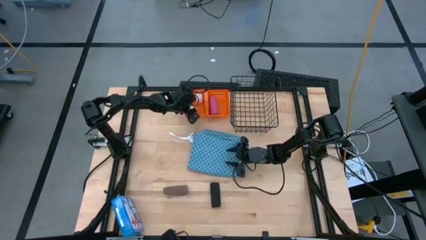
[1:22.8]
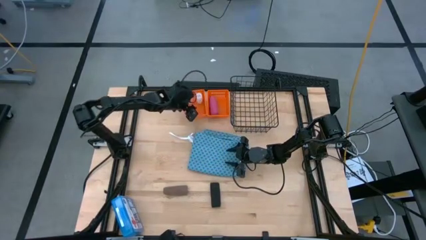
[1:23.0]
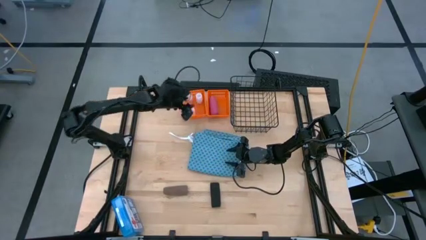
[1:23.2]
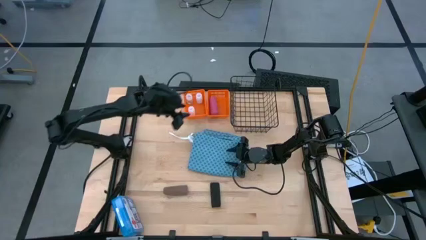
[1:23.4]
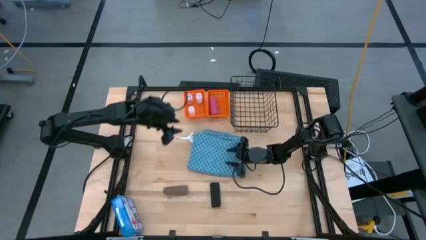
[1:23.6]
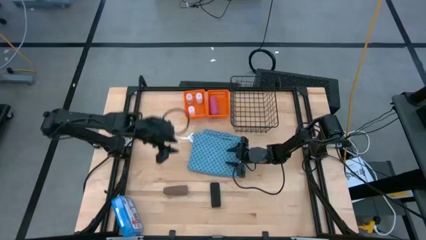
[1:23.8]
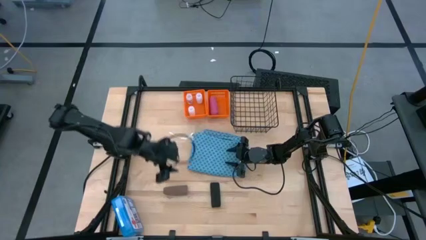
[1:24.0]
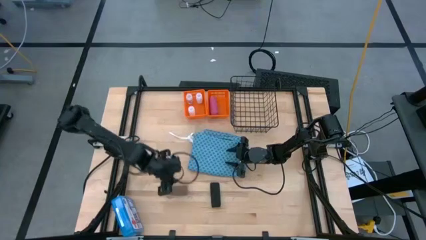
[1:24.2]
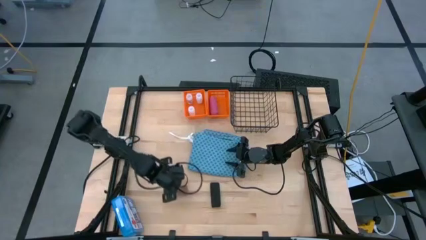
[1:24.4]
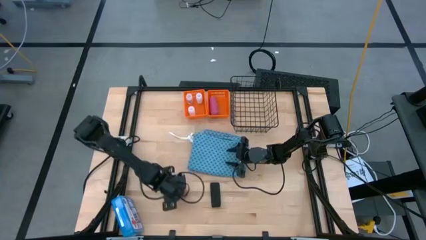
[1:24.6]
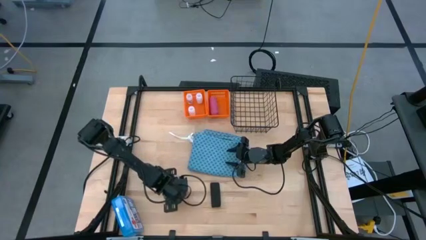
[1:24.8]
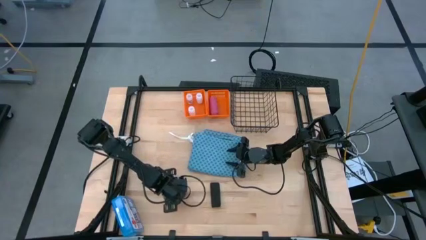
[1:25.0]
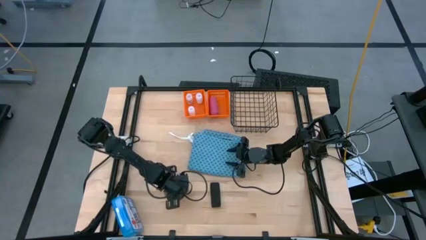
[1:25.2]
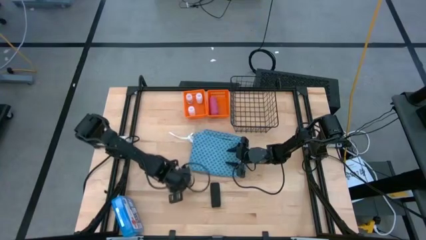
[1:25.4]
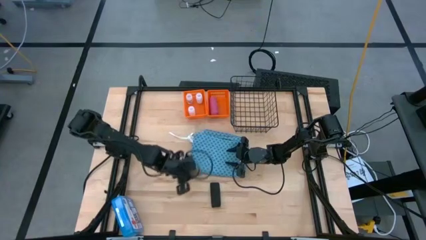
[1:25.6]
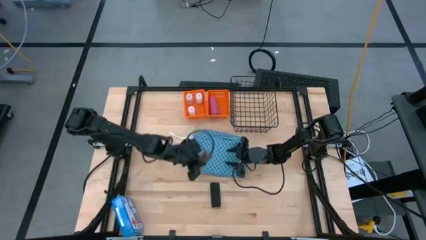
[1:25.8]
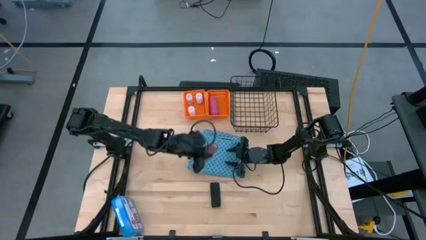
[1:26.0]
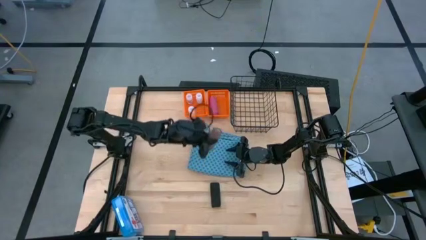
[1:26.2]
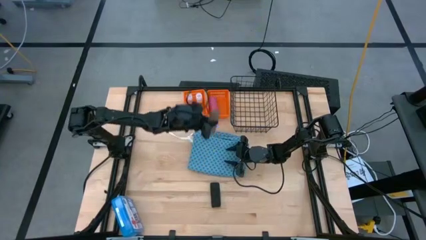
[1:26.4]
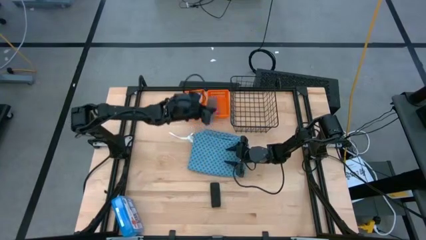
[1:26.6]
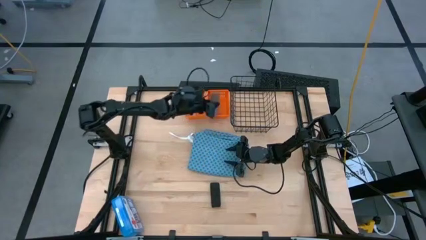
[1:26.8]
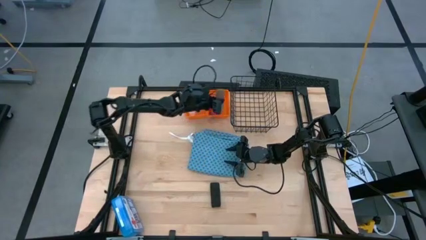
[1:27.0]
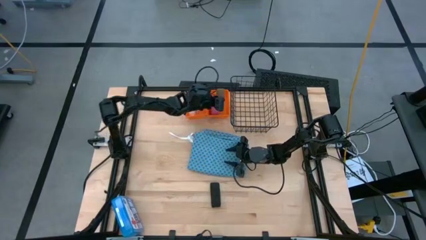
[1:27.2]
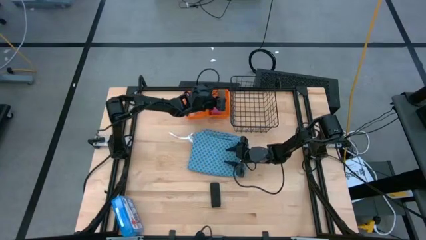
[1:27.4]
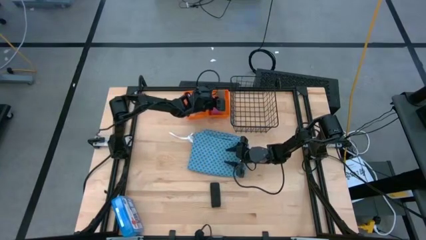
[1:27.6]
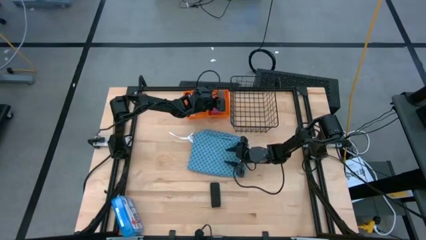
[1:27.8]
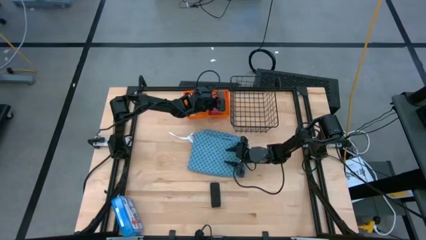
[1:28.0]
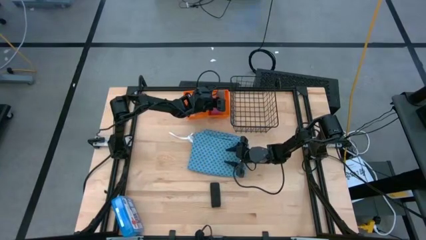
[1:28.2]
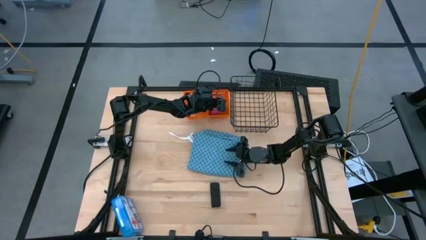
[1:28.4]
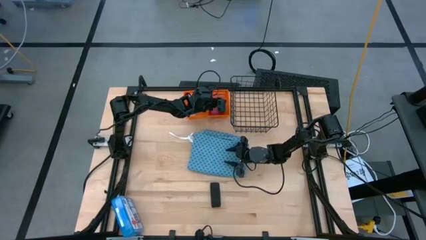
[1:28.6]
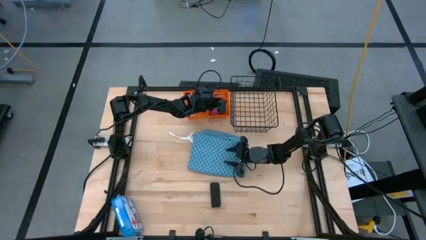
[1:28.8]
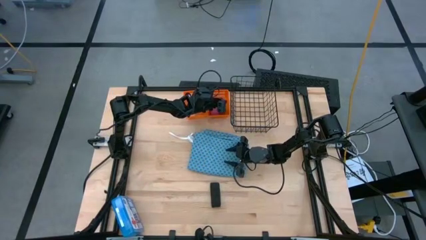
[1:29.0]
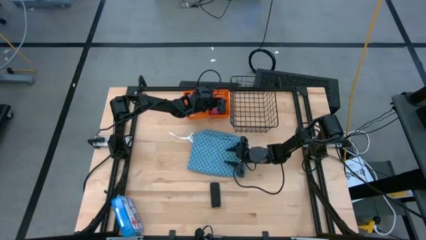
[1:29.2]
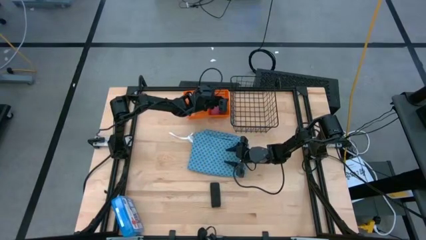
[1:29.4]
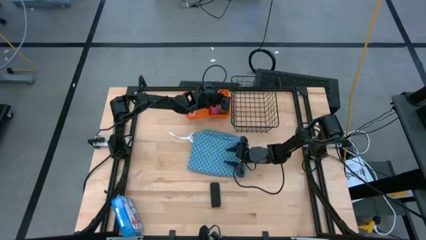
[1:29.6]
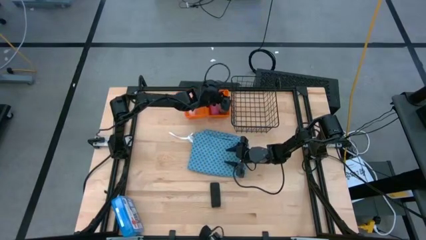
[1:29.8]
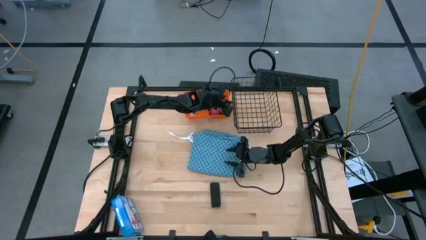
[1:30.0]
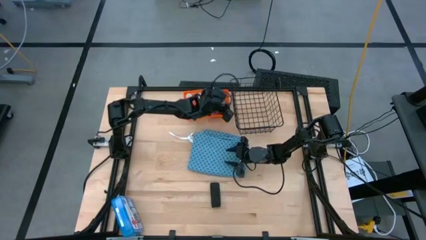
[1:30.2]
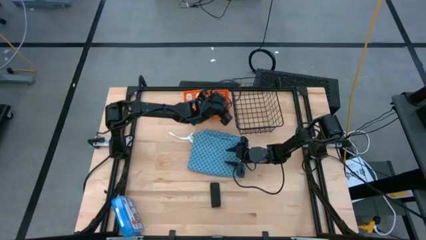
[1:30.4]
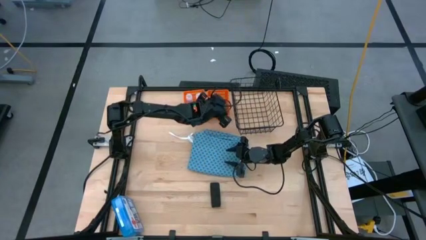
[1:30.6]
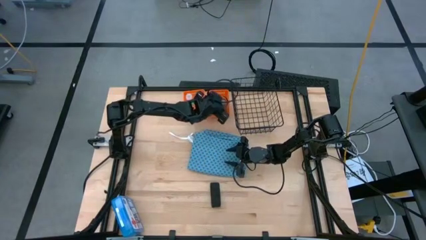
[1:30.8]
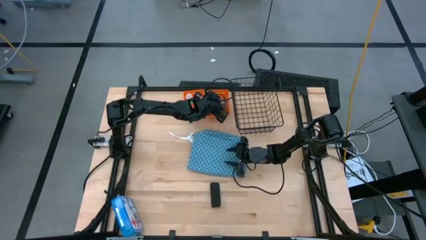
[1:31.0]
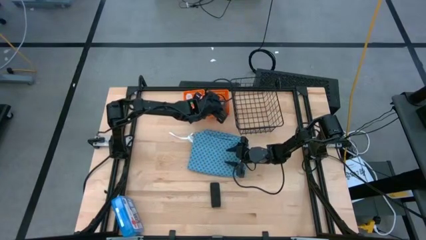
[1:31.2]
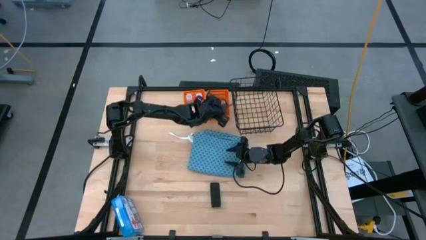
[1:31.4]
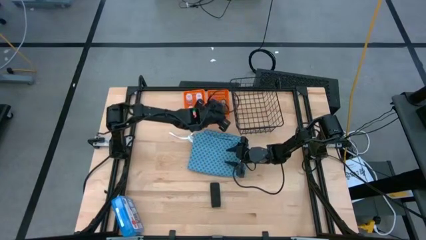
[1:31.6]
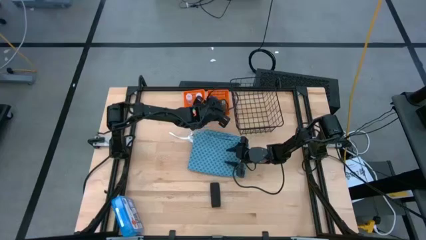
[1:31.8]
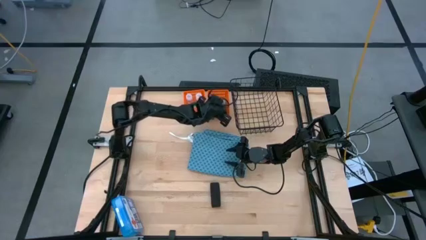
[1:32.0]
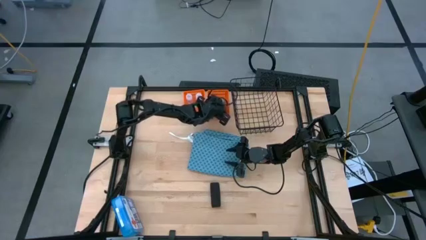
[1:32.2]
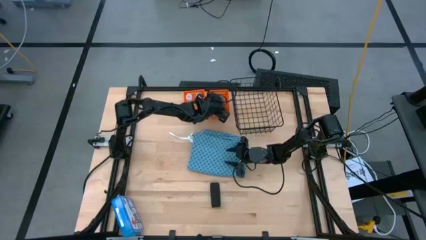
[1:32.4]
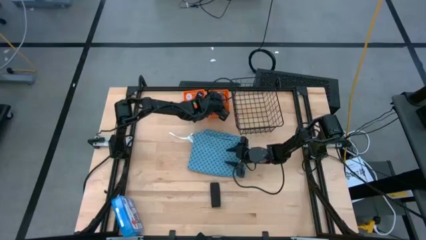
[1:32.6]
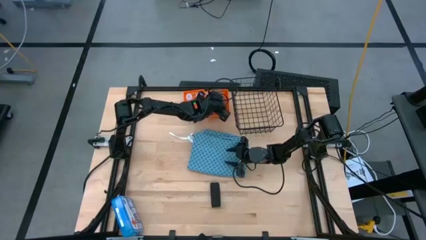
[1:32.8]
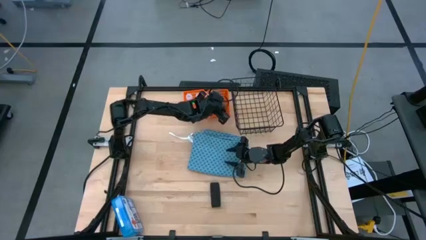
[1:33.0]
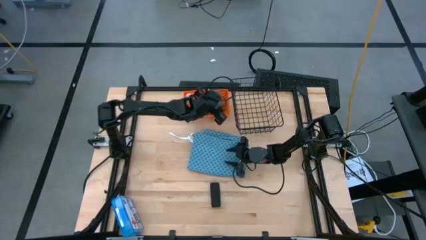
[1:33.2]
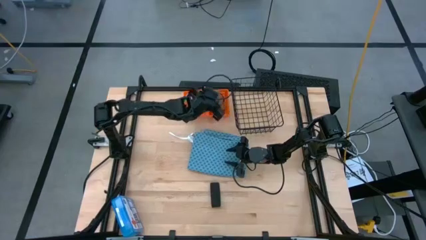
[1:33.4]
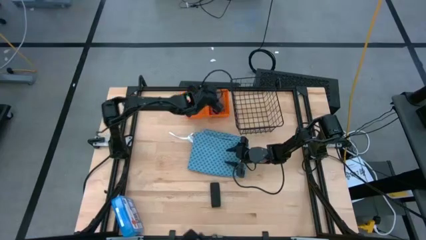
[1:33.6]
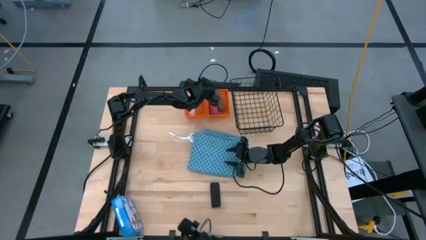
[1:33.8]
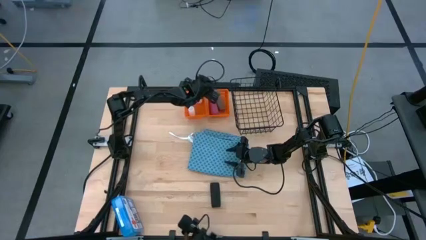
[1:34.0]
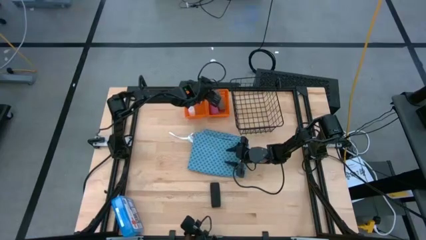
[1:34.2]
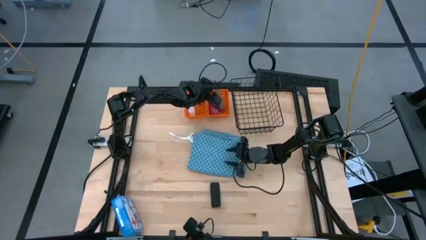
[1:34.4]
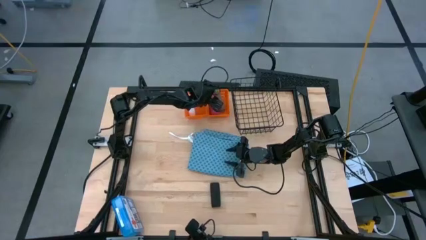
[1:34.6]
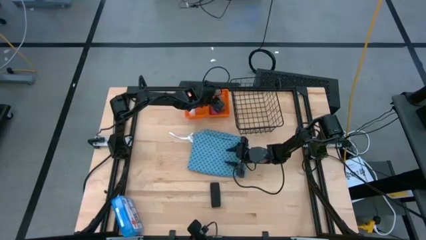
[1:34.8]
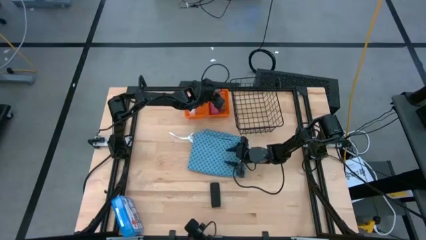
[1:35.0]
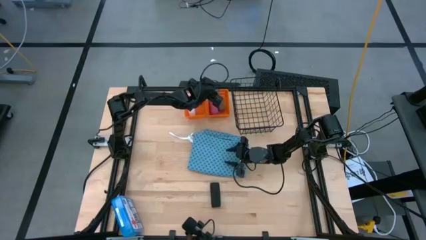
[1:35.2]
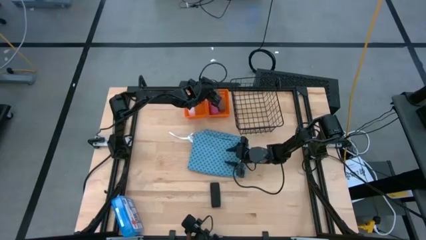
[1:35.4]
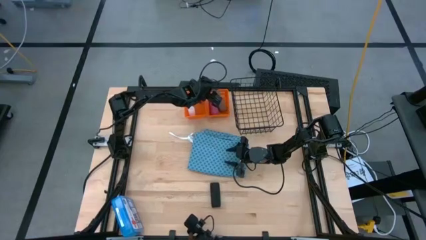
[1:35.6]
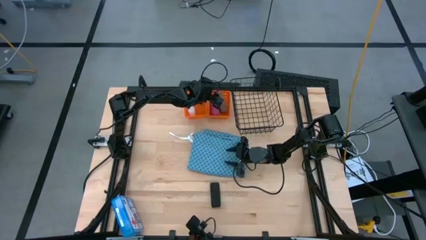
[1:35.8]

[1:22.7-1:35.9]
Task: Pick & Place Medicine items
Put the brown bandage into the right orange basket
